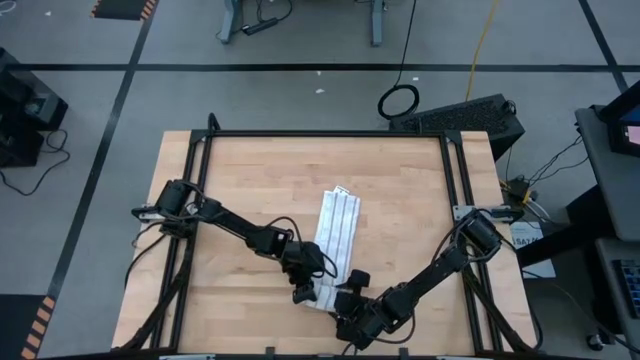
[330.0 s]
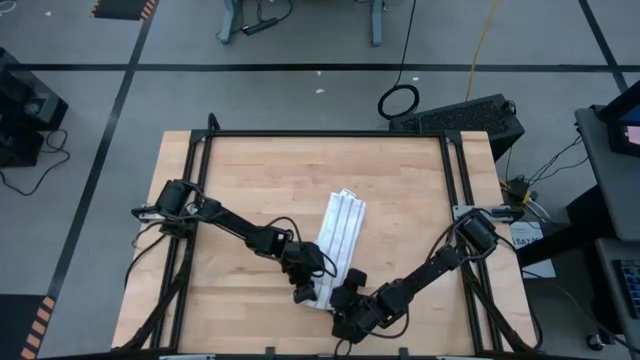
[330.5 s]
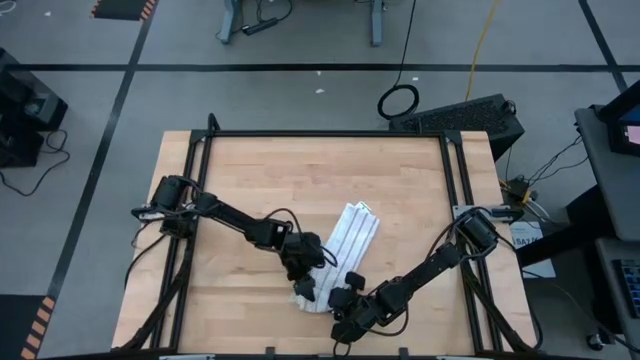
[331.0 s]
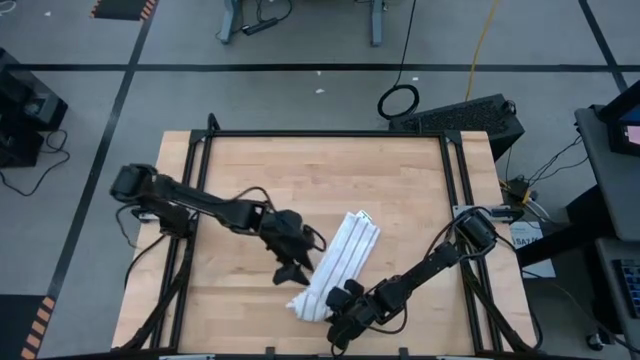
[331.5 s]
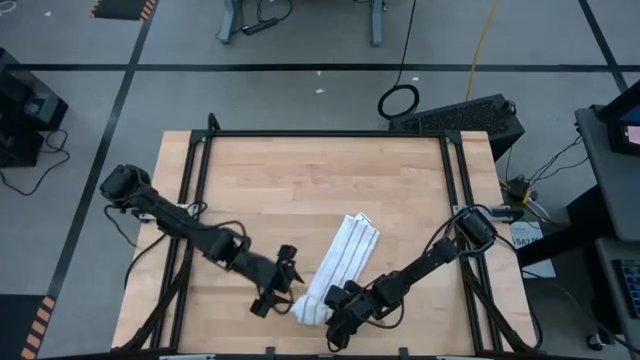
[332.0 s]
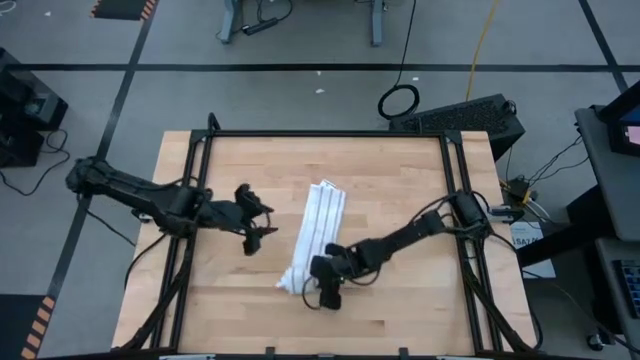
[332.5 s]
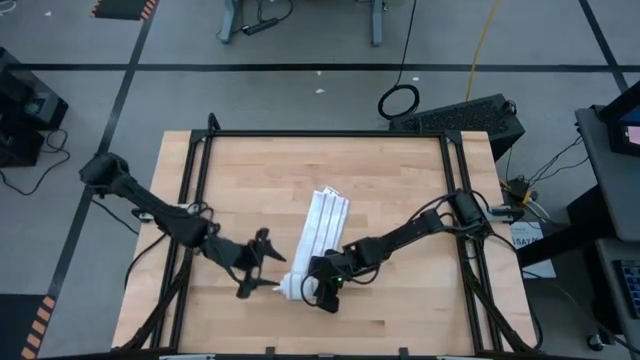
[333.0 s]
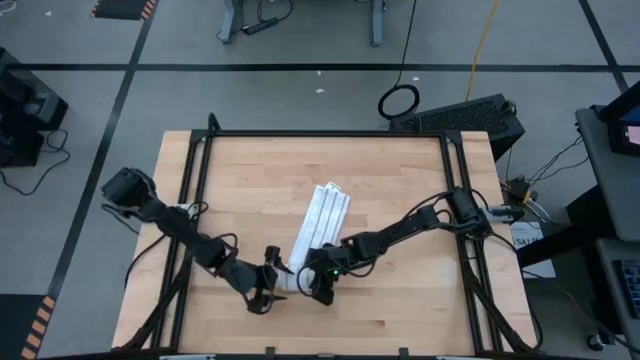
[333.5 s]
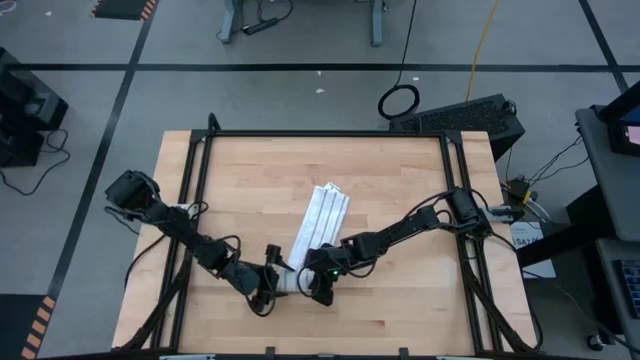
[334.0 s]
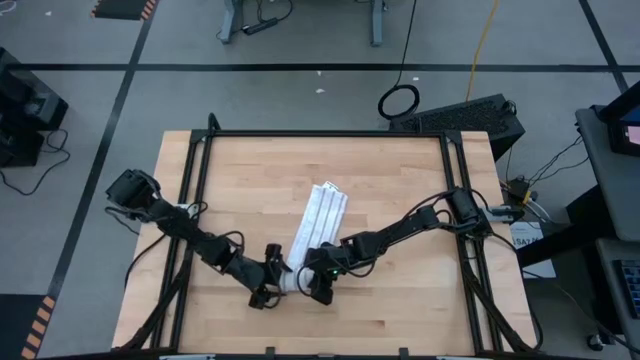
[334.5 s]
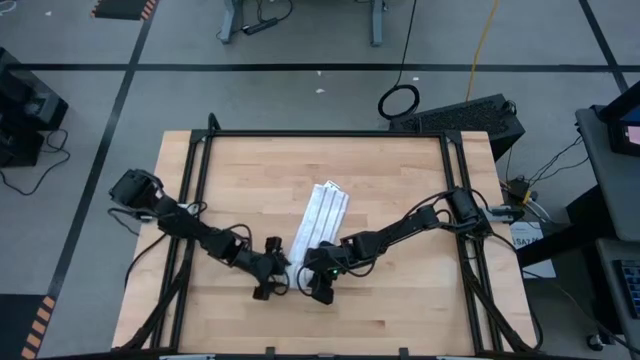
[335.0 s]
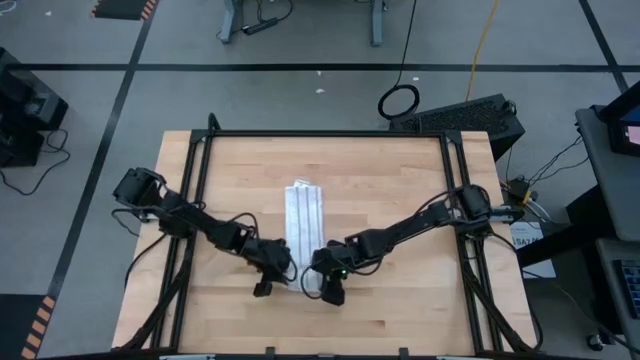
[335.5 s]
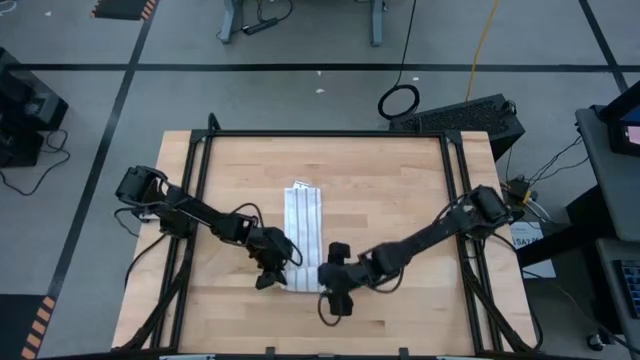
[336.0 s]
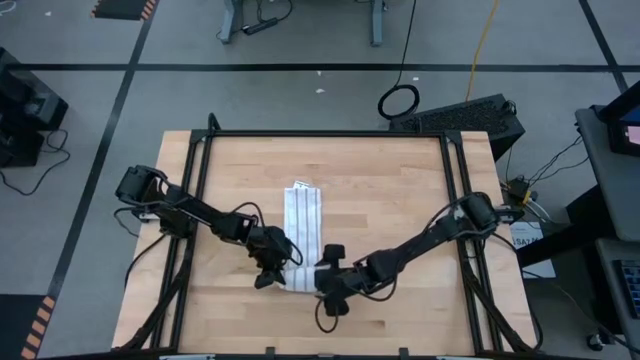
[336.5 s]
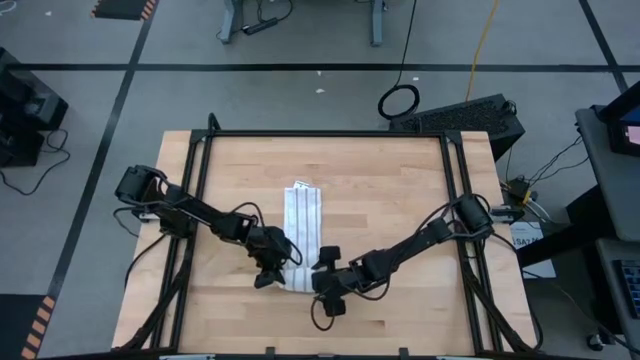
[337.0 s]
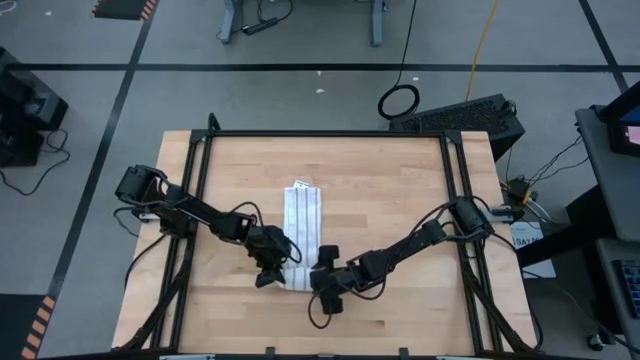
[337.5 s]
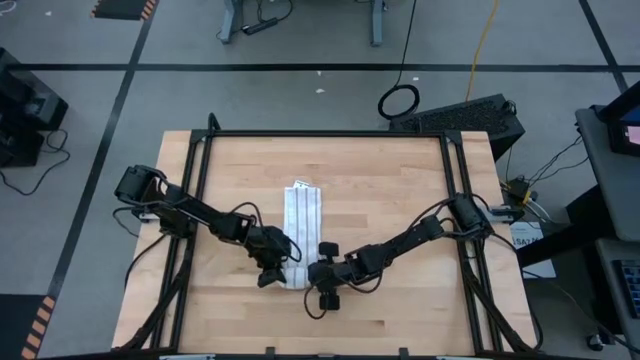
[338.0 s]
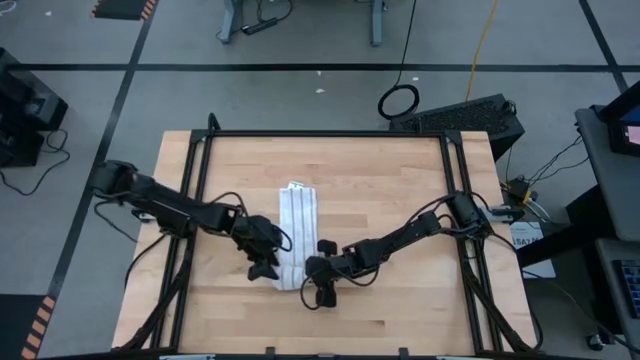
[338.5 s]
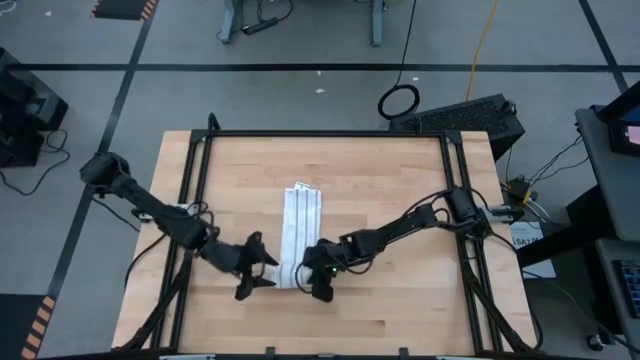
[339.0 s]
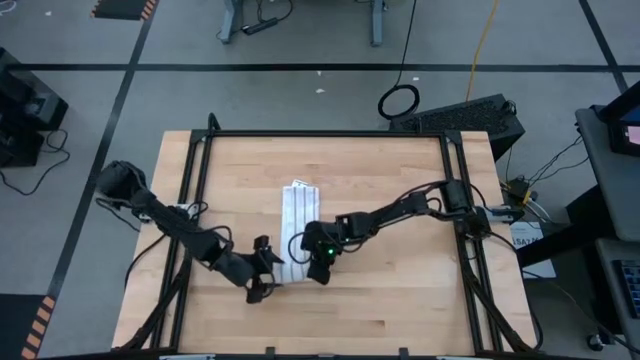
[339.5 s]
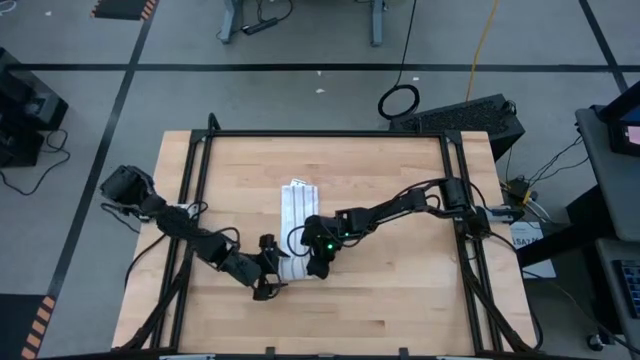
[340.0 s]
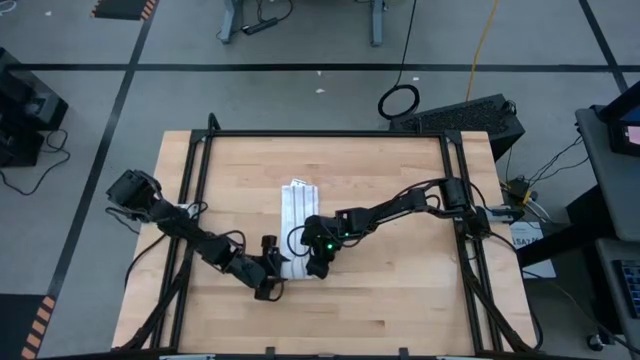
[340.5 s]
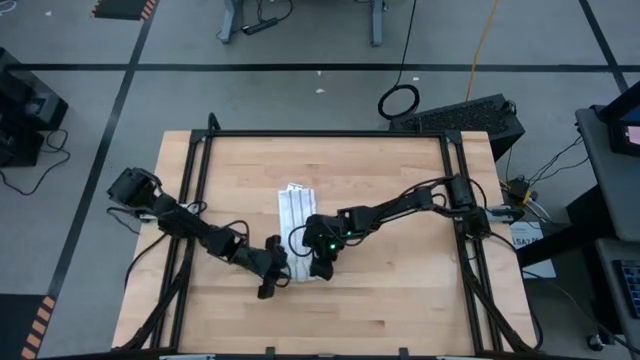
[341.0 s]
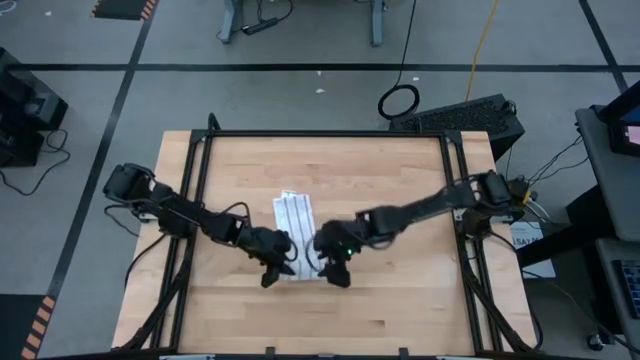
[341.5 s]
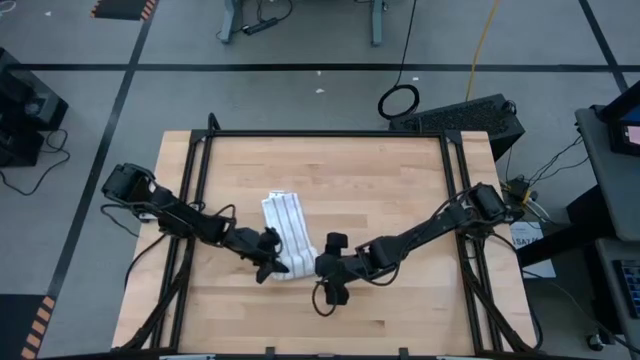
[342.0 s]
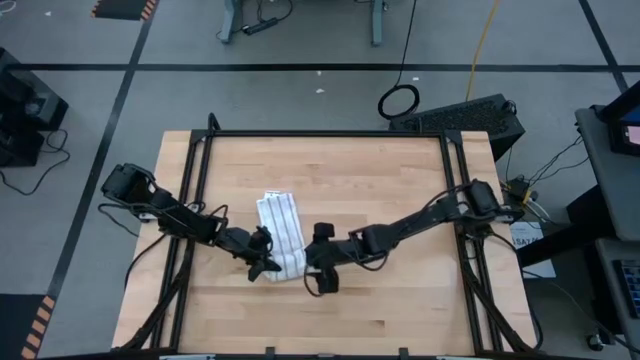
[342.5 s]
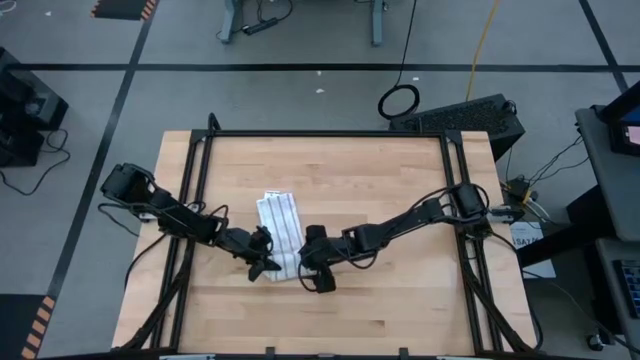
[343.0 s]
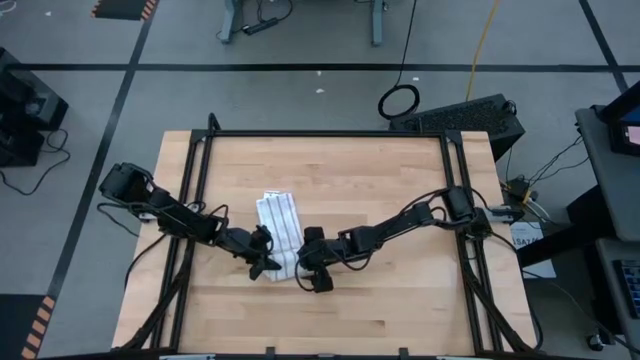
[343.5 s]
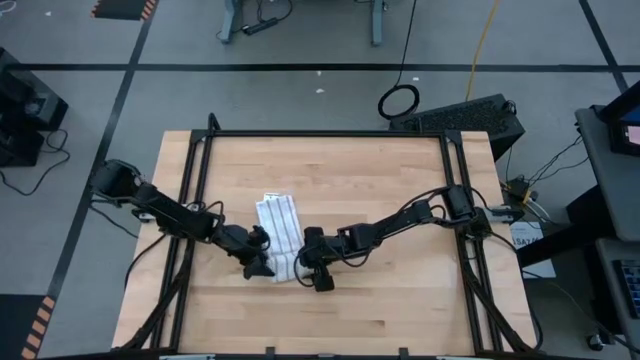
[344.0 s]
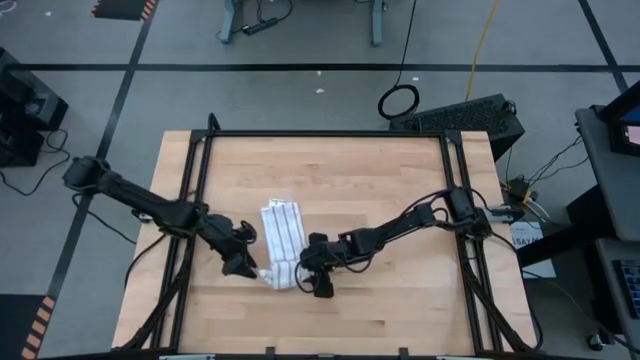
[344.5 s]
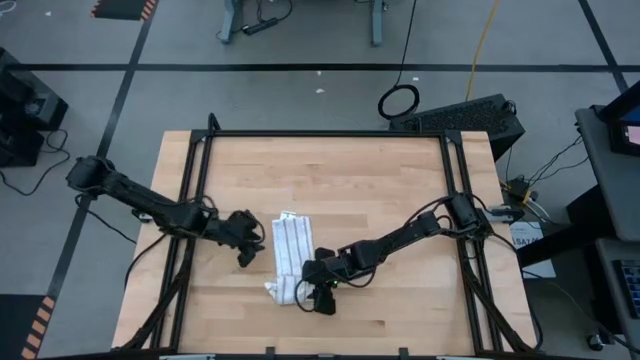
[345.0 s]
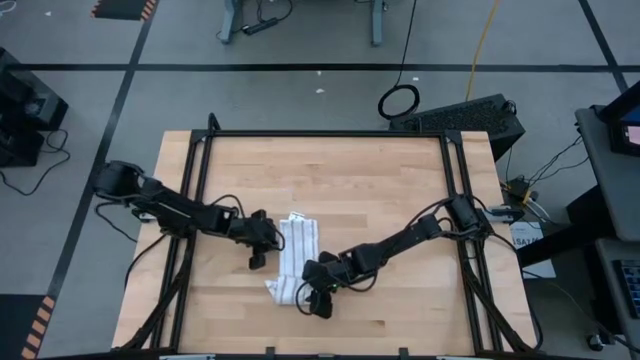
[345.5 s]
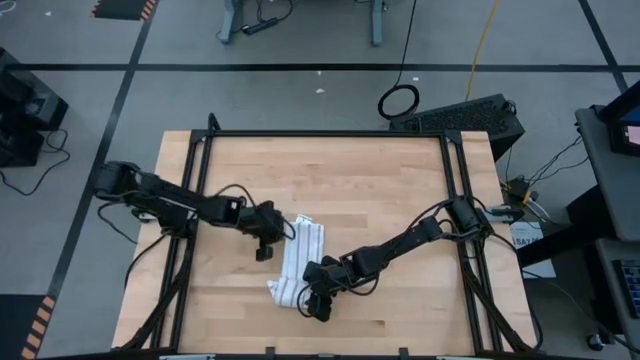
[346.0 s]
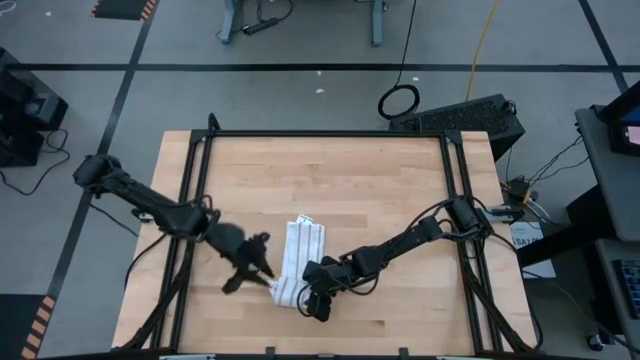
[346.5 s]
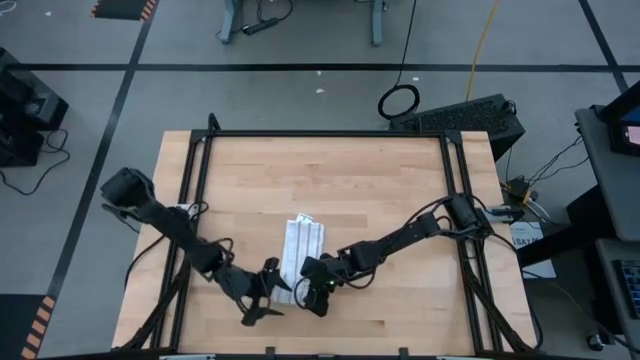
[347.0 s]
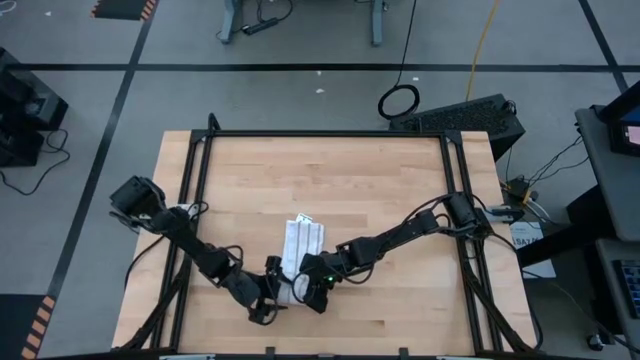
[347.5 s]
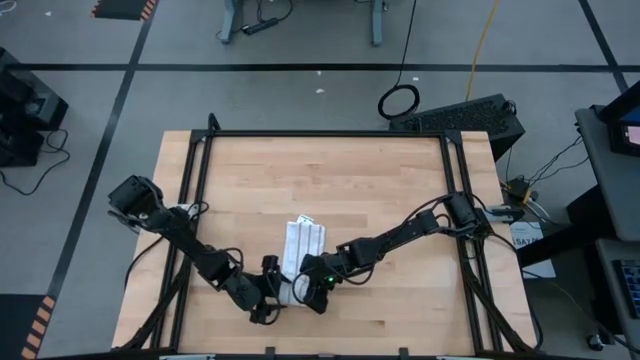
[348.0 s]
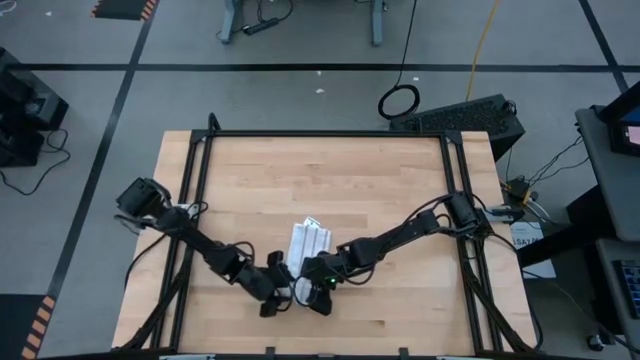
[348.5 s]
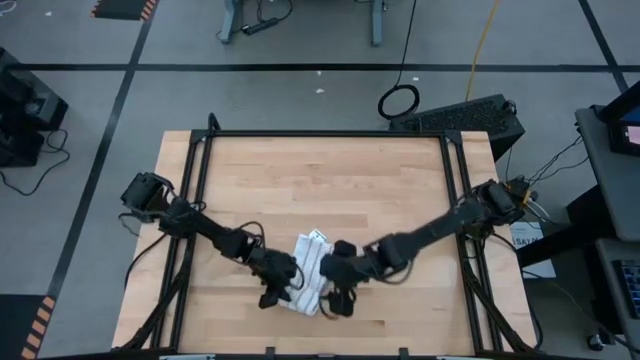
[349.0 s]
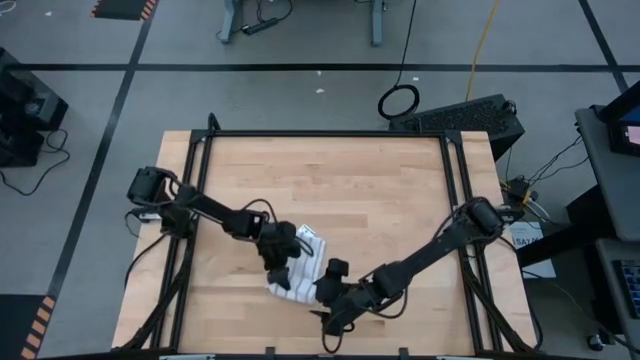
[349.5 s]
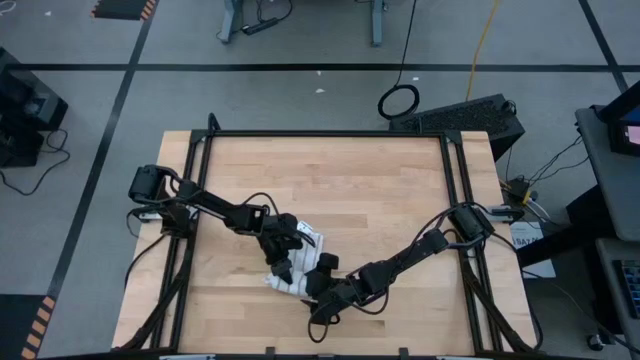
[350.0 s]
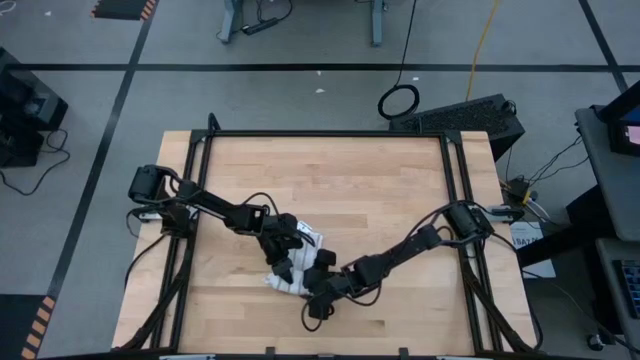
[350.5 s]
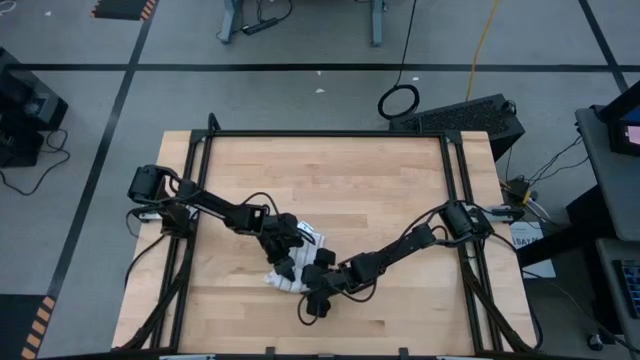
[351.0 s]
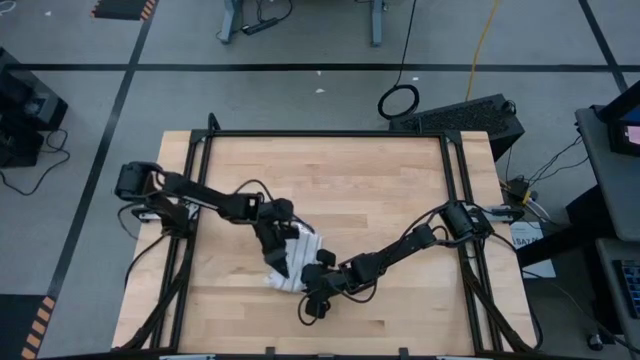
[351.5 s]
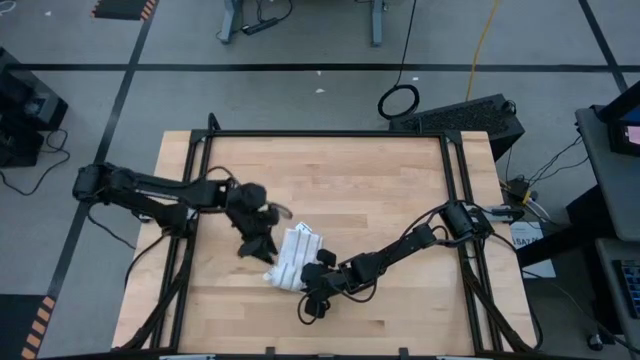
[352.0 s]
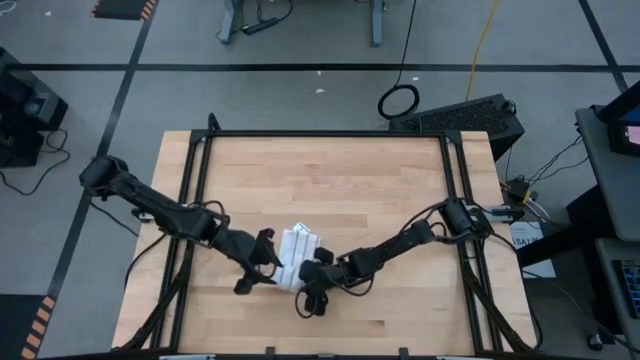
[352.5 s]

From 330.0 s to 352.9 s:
Task: Roll towel into tight, uniform cylinder
Roll the white brown kitchen towel
